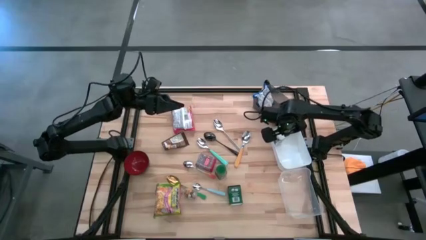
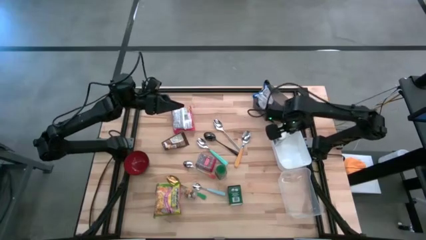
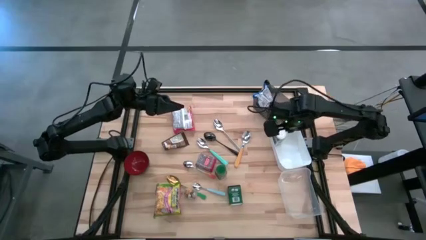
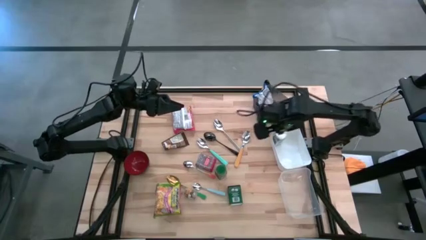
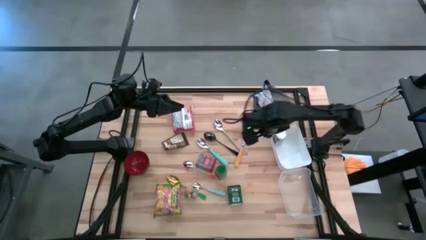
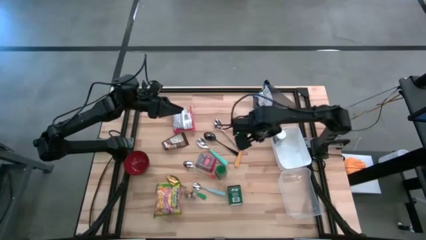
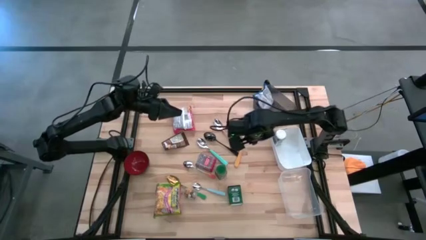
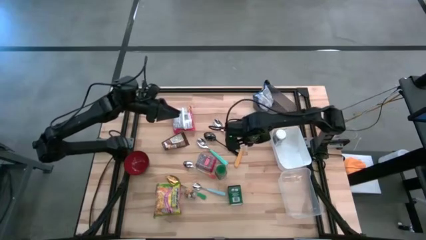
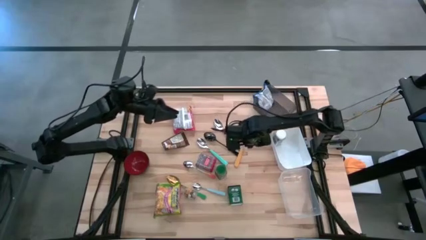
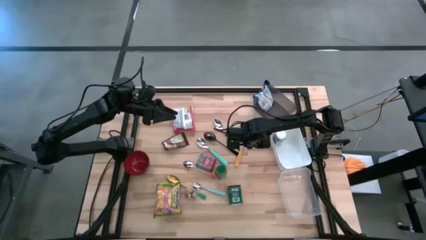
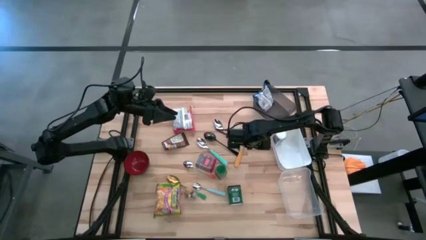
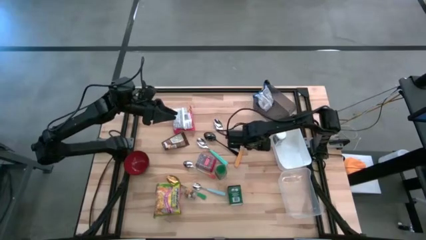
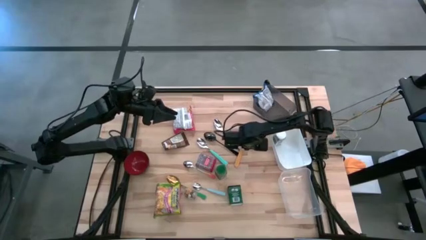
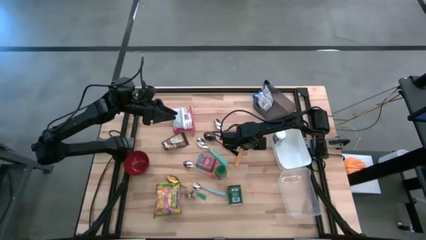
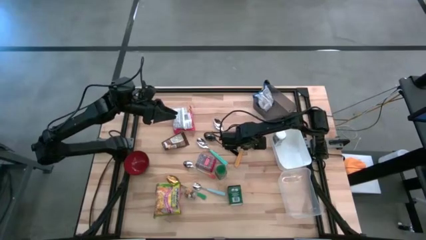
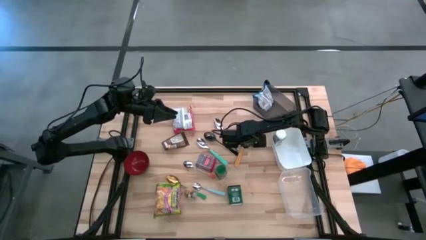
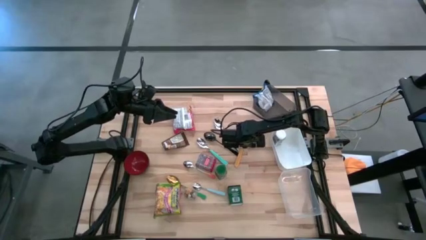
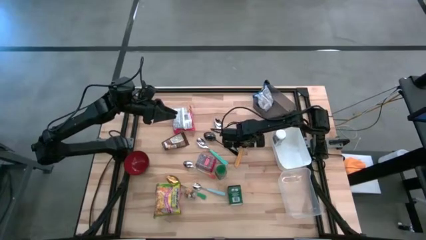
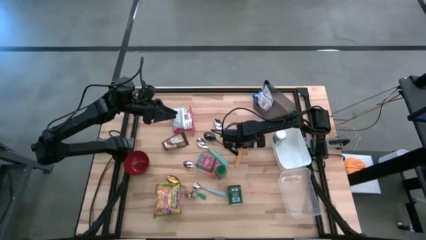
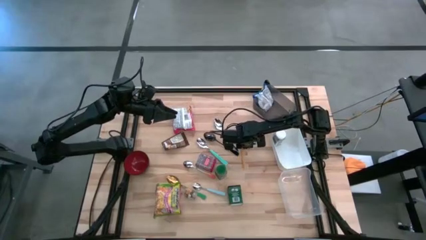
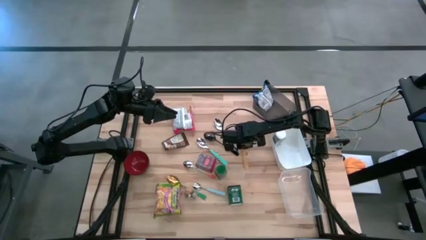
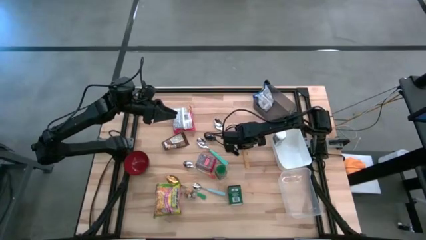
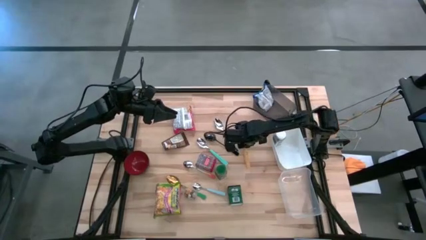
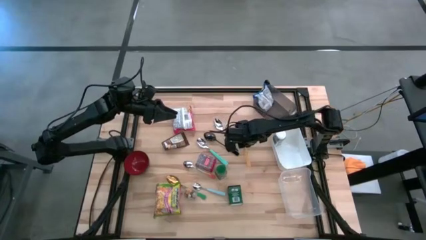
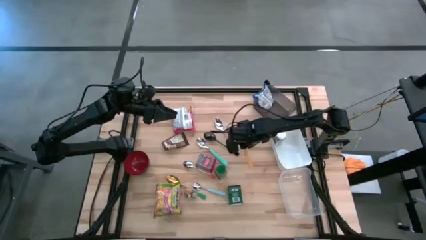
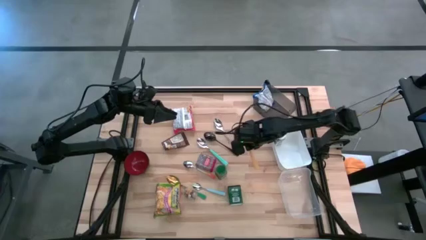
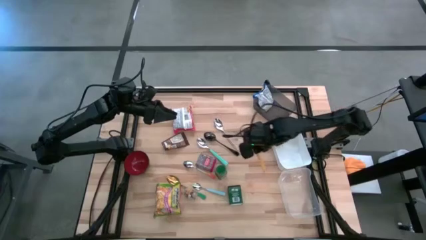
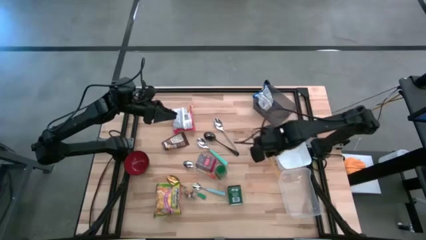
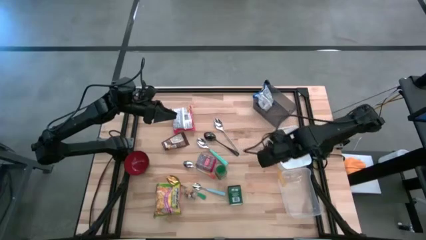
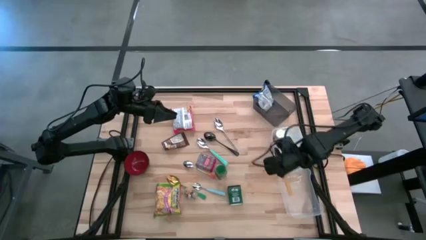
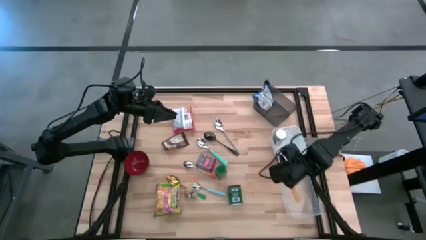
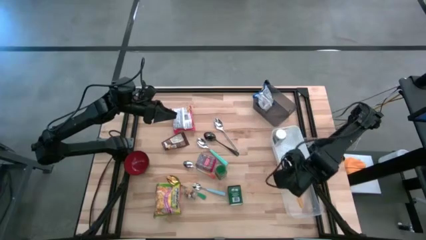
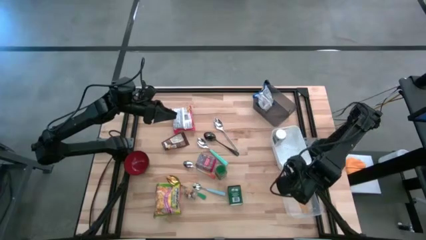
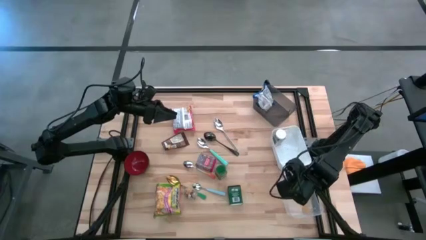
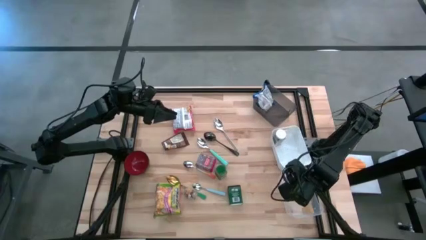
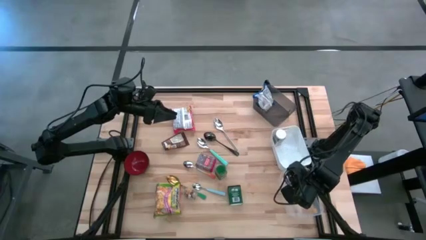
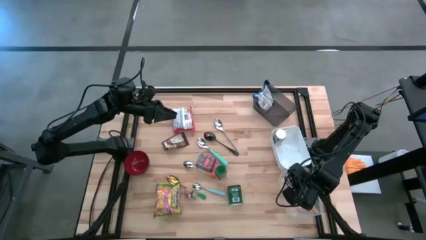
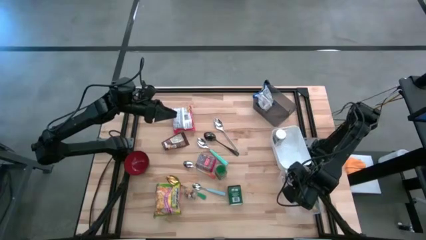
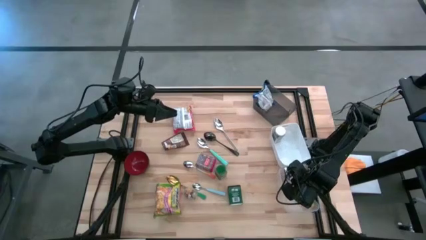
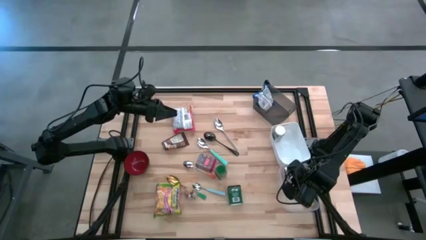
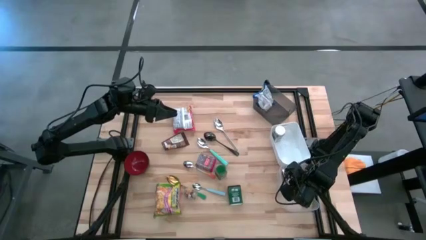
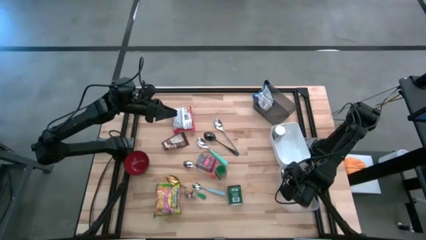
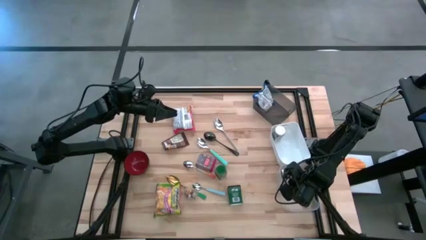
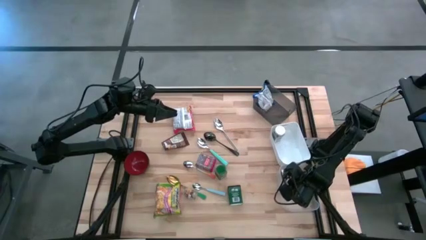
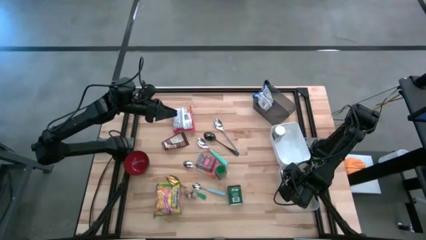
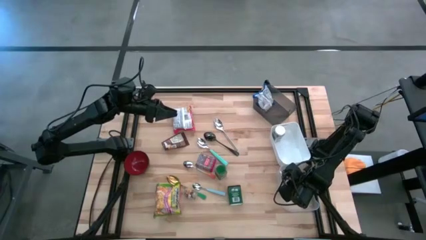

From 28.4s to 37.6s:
Put the brown spoon into the transparent bin

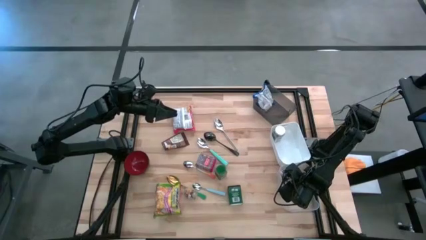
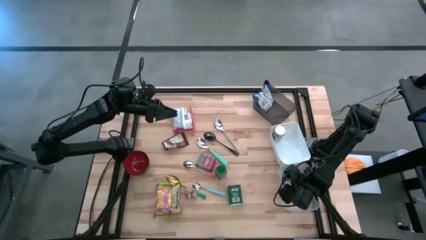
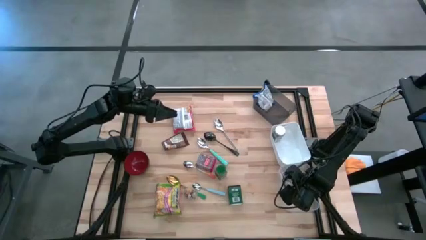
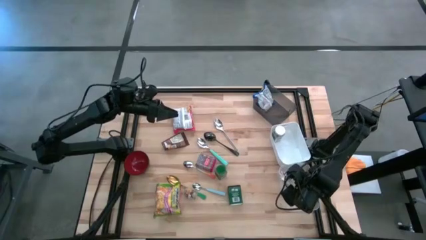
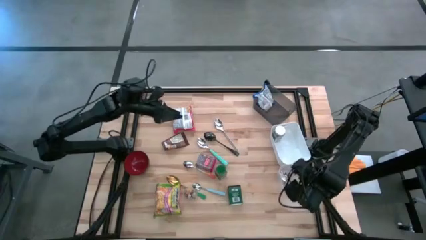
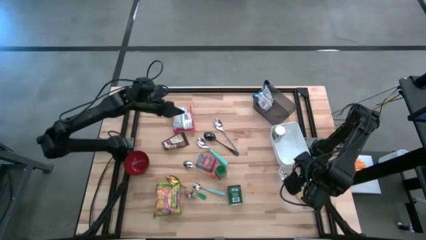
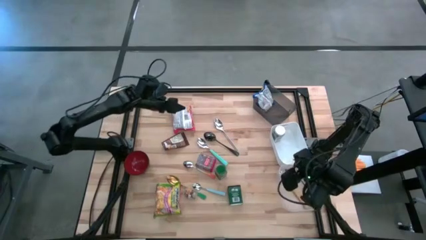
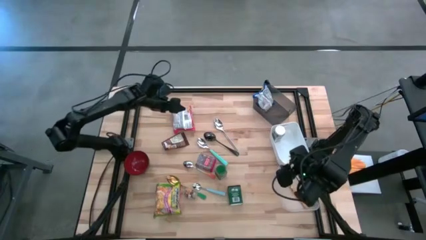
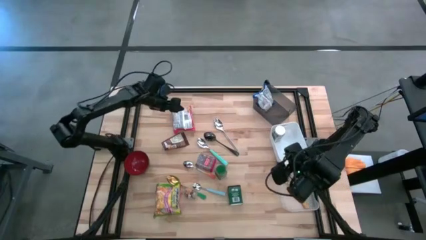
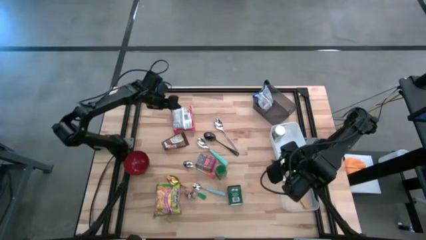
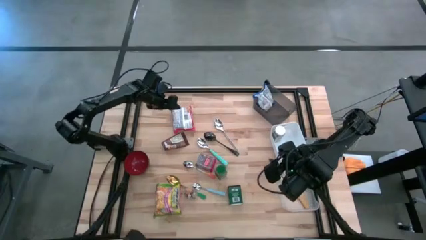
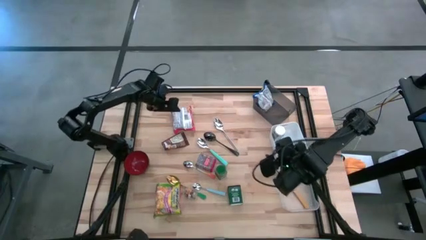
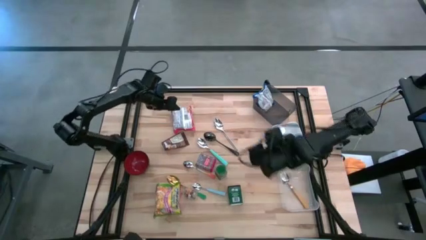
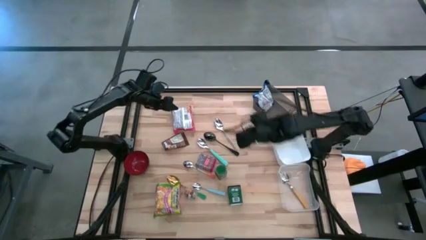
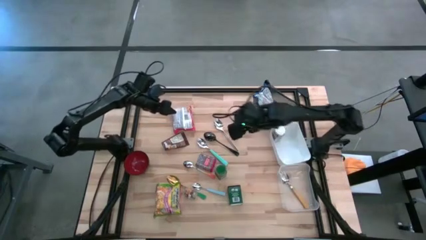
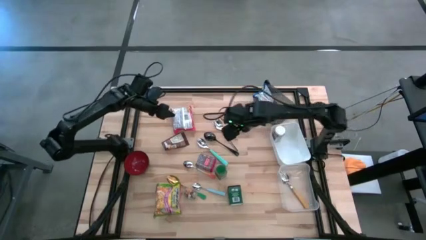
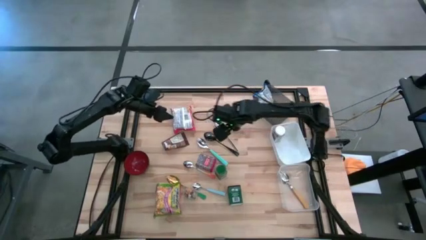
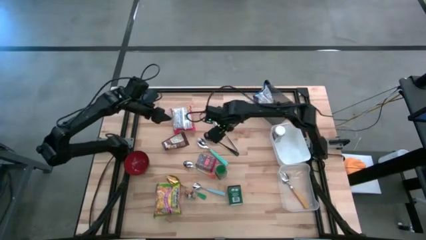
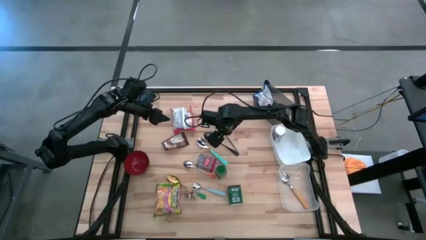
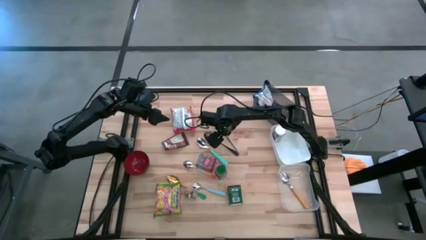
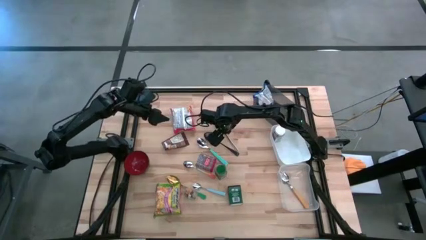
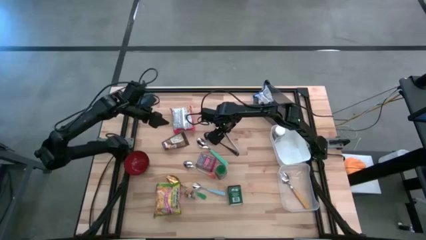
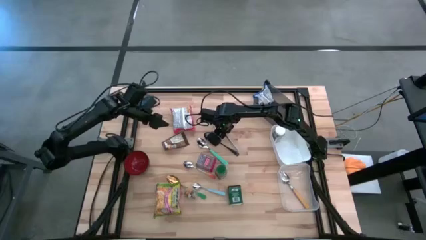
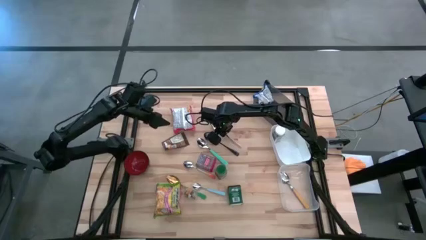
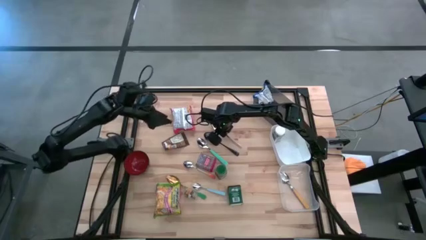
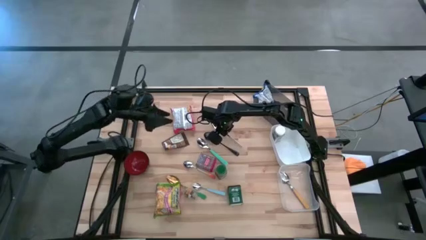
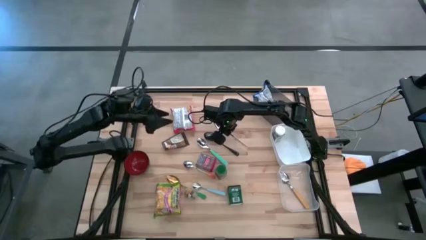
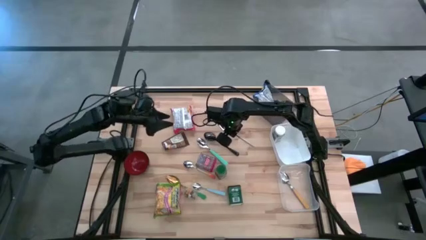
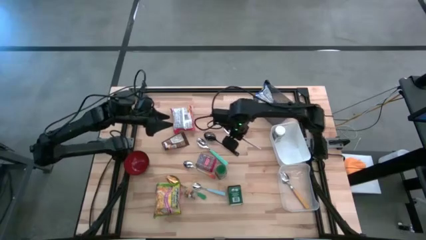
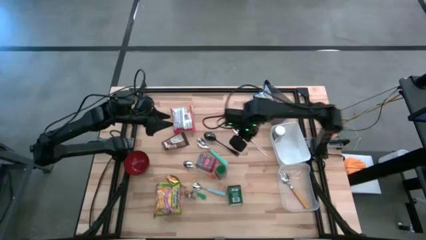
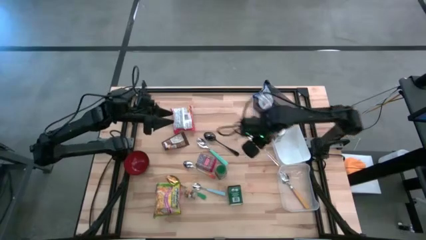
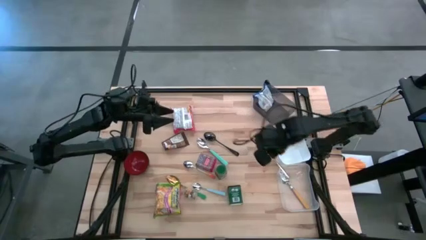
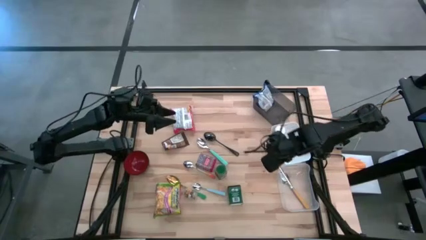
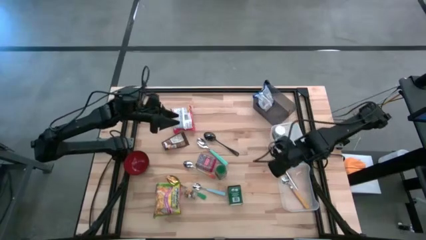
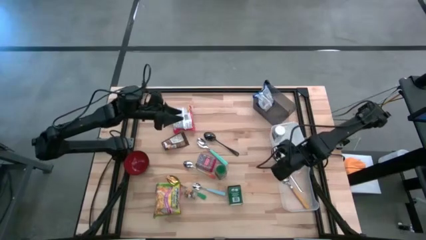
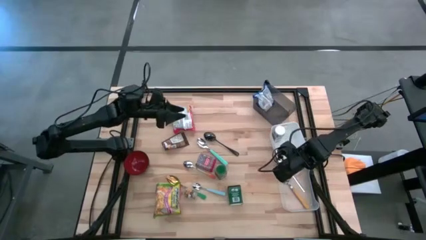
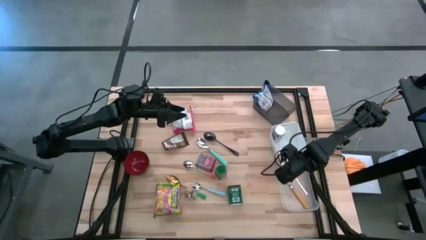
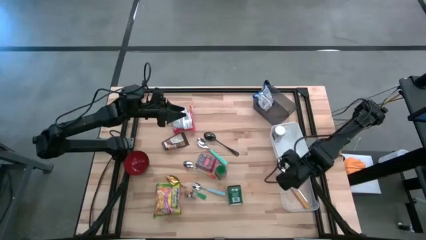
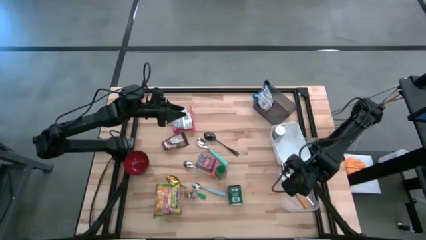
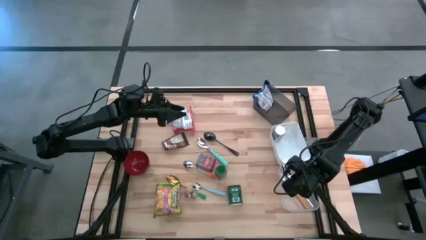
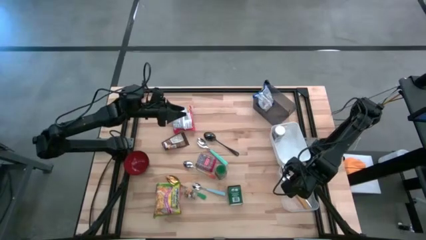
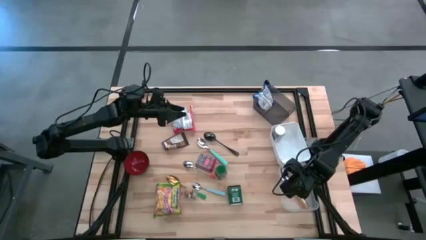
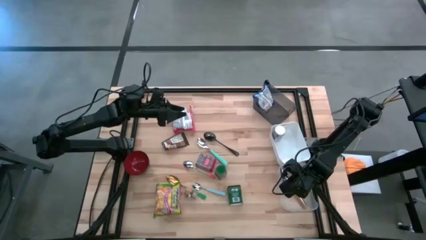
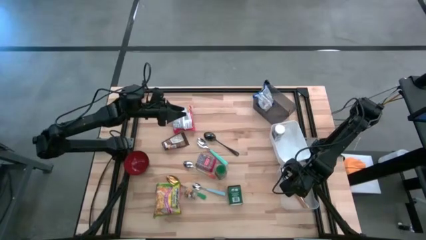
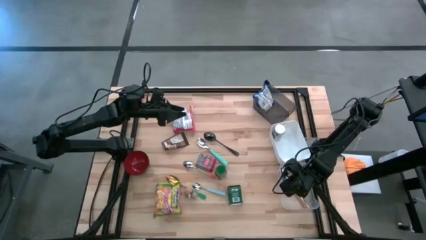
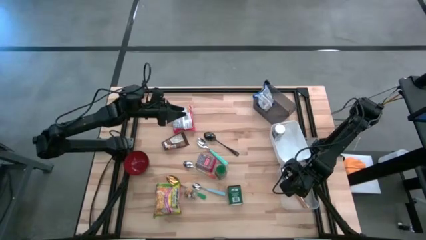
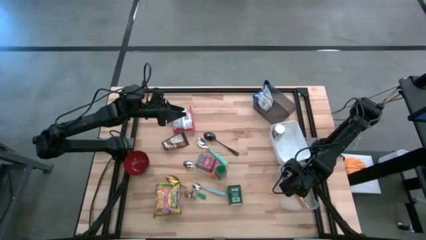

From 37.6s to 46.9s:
Put the silver spoon into the transparent bin
